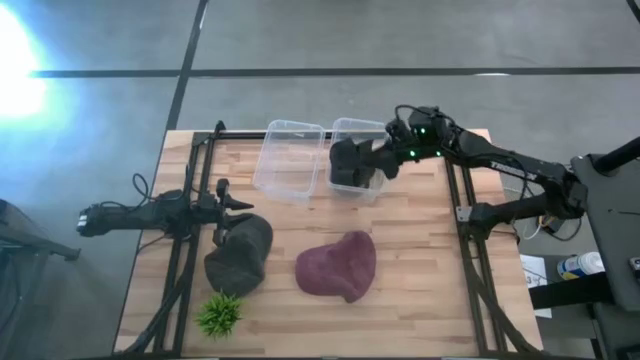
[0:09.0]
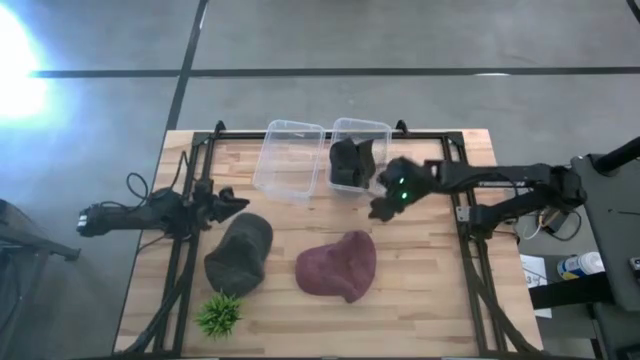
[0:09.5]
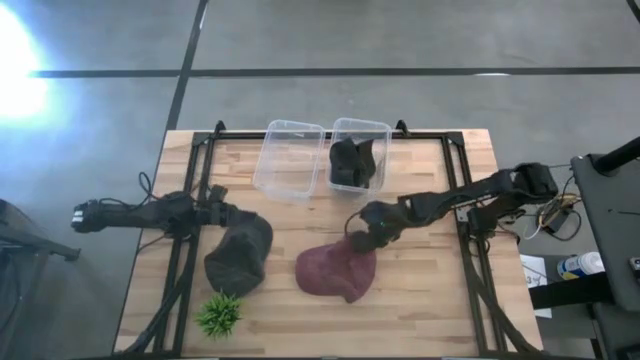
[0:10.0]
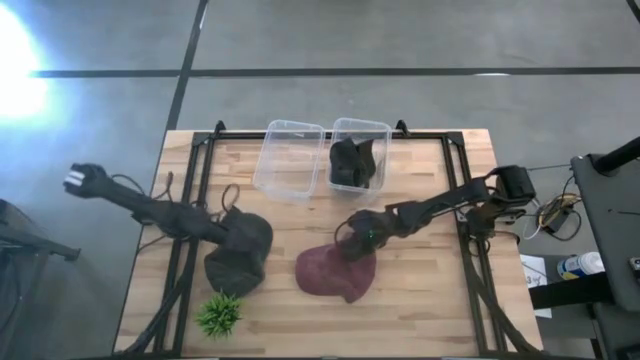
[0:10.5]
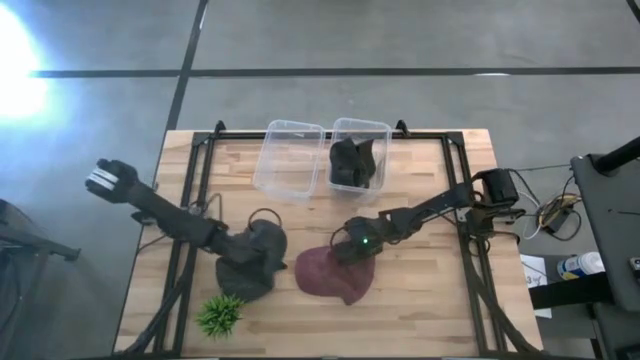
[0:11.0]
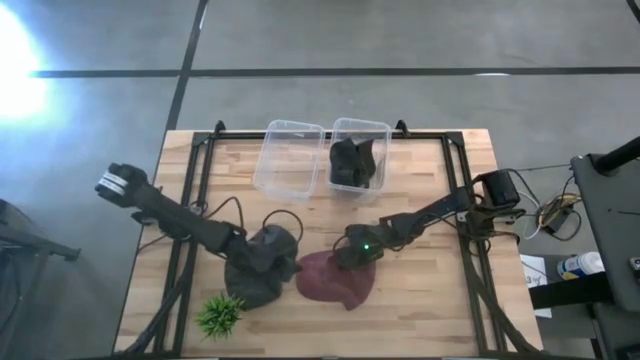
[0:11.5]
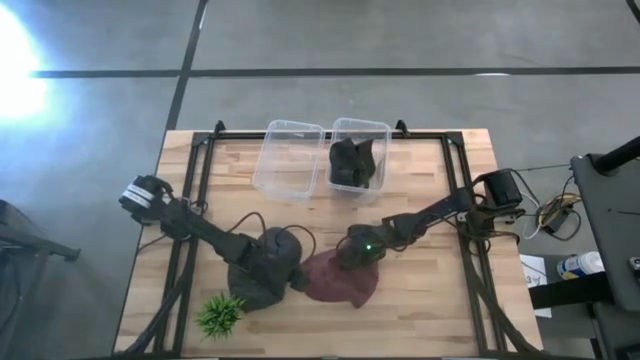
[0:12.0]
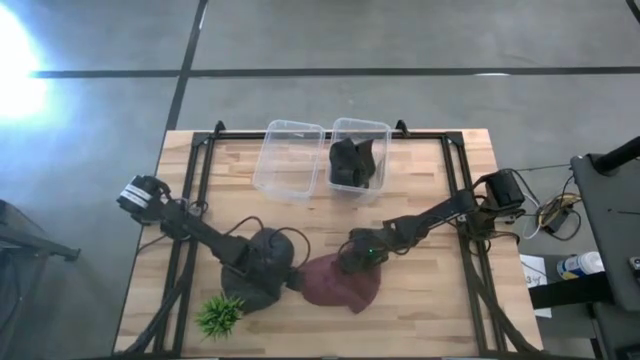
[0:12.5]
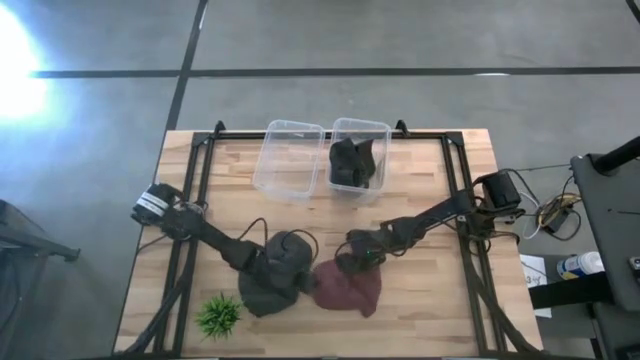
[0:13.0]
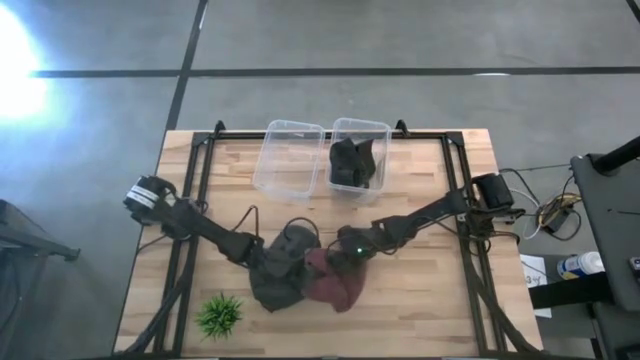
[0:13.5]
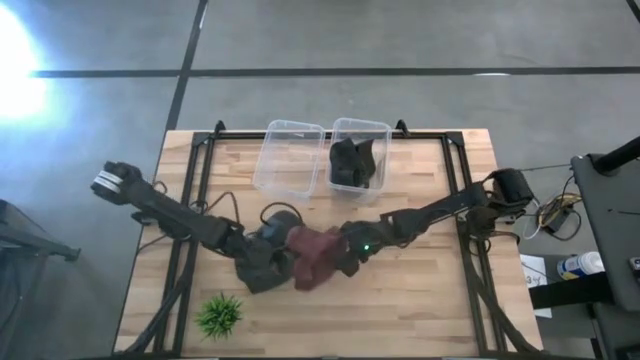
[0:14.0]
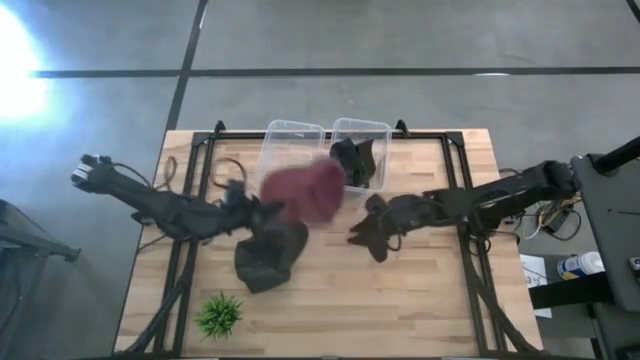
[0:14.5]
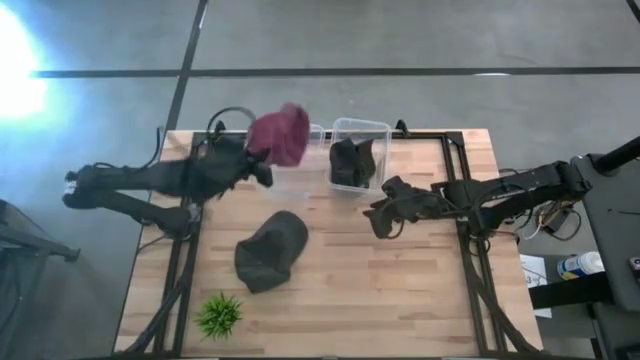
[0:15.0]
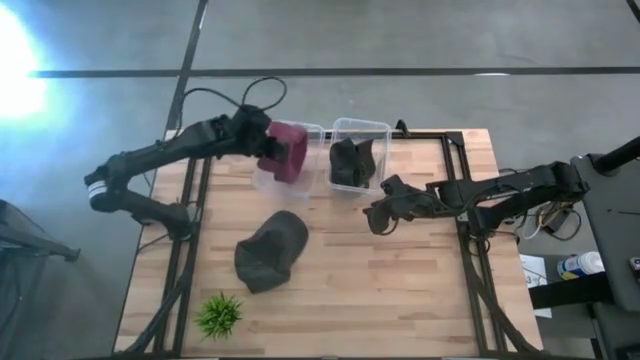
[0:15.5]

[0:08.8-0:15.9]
Task: Pick and place caps into container
Put the red cap into the left transparent container

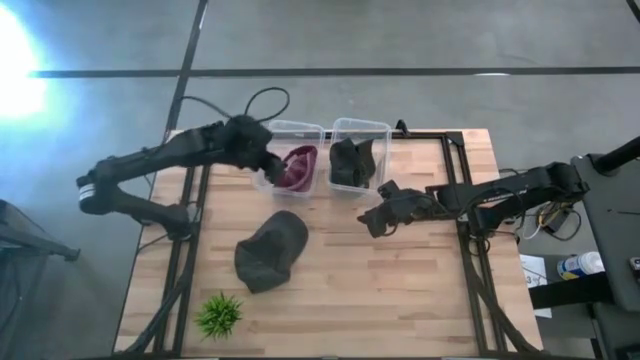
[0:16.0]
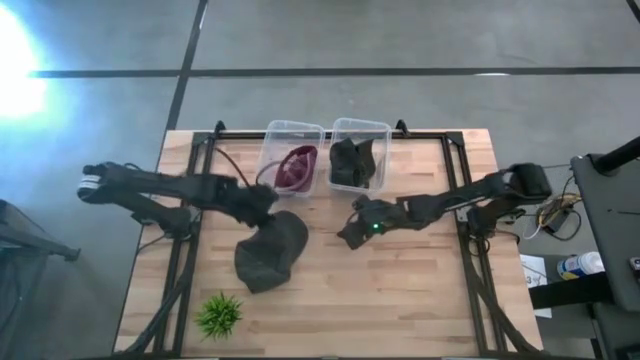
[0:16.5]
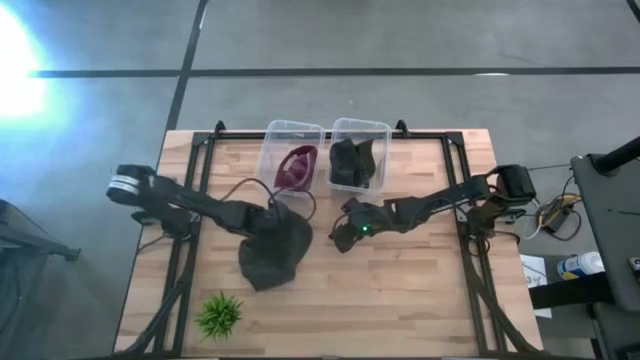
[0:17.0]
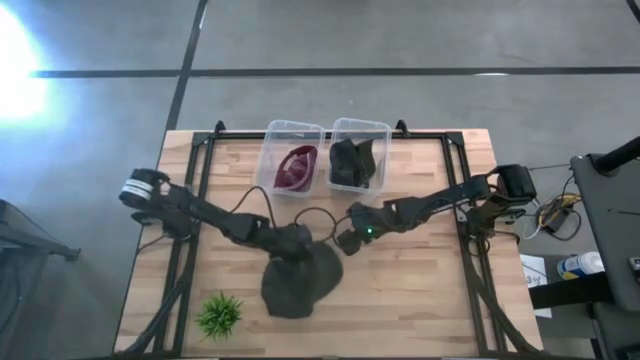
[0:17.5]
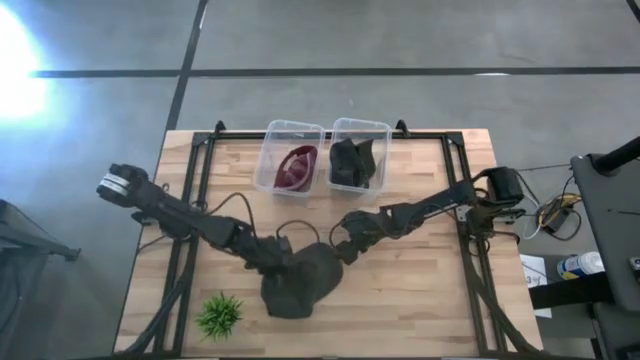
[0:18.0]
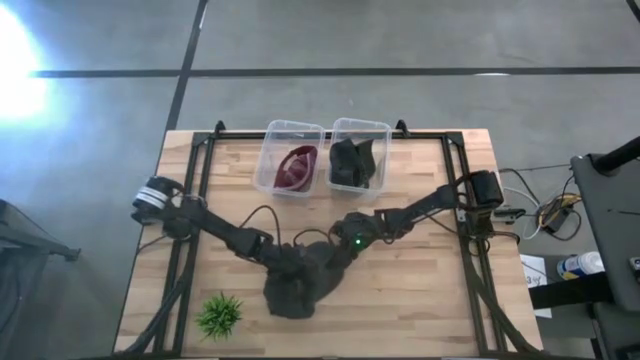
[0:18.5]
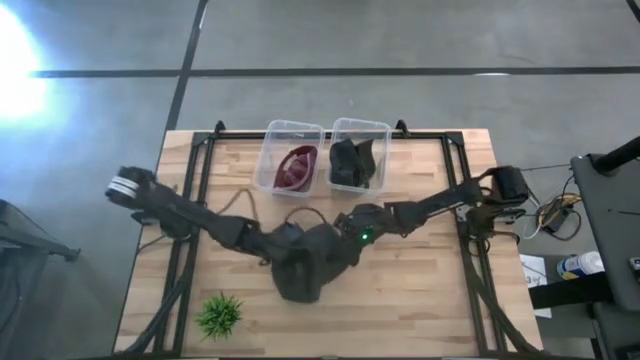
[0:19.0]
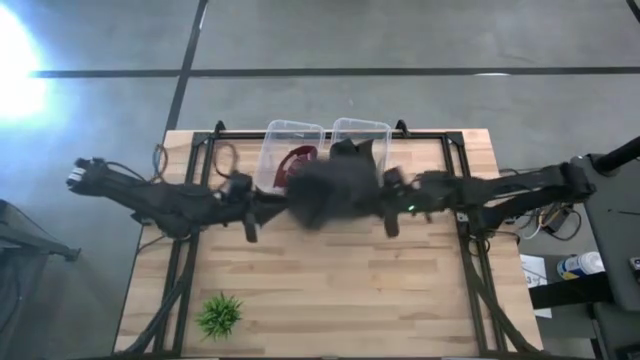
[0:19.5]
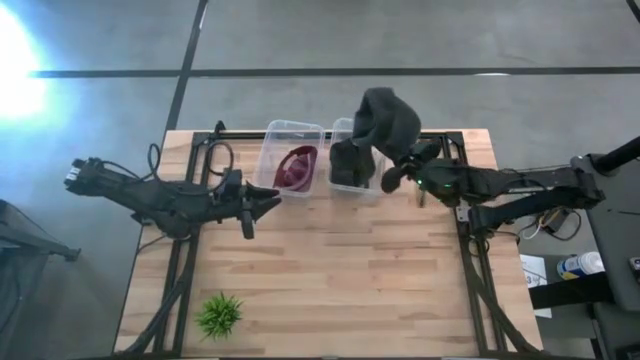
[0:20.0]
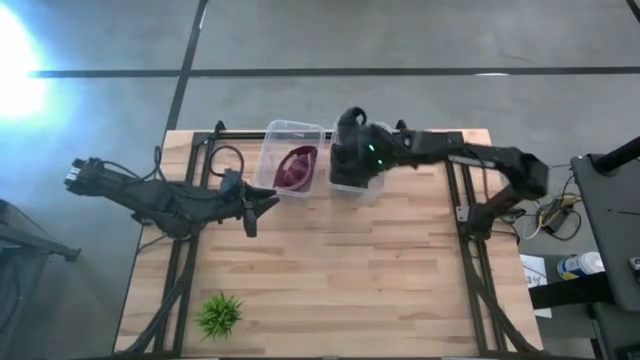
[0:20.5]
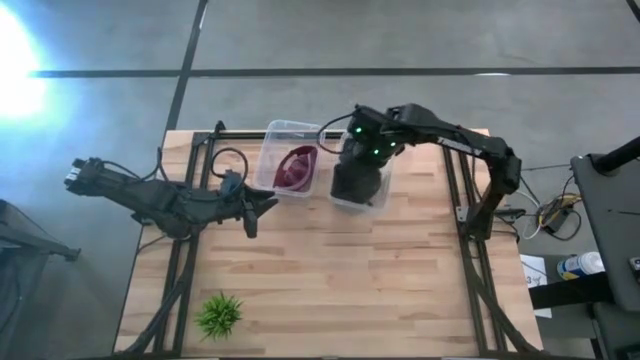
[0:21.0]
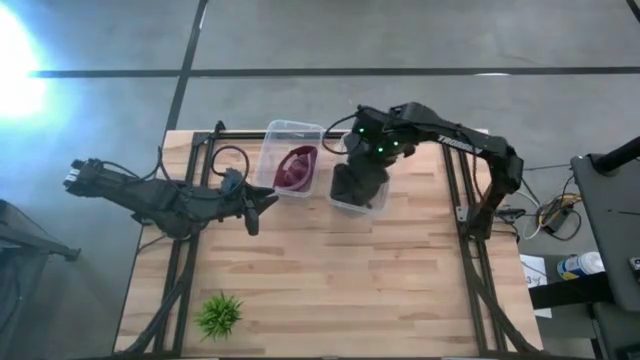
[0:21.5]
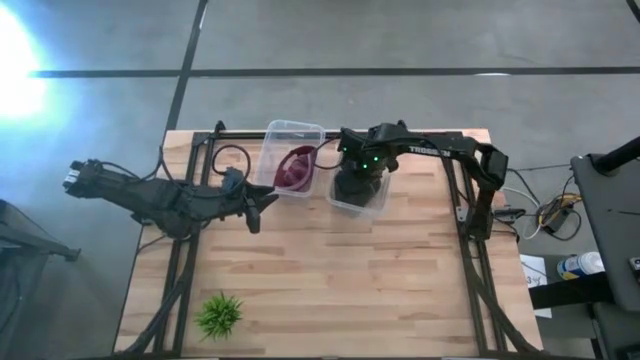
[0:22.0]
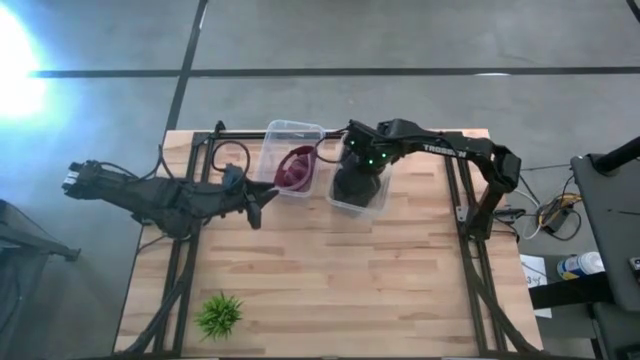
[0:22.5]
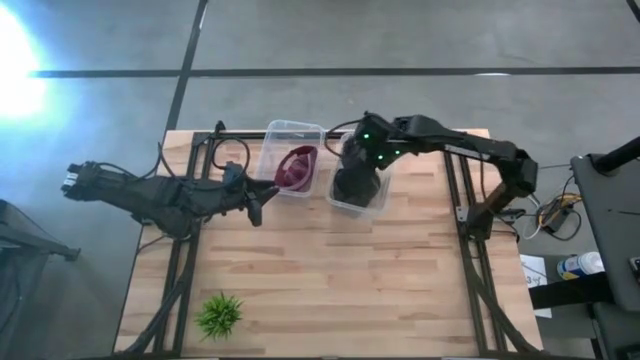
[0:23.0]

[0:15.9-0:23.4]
Put the black cap into the right transparent container

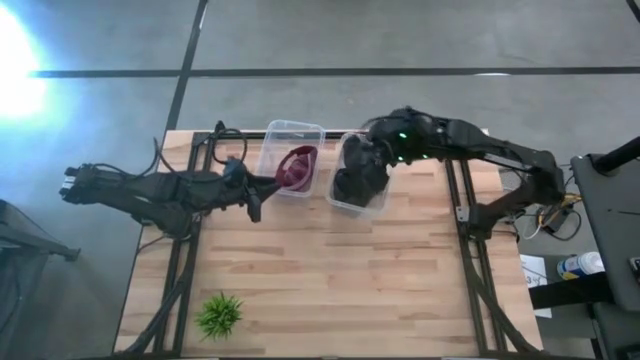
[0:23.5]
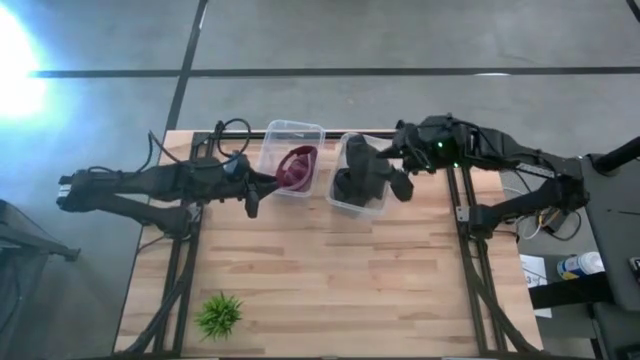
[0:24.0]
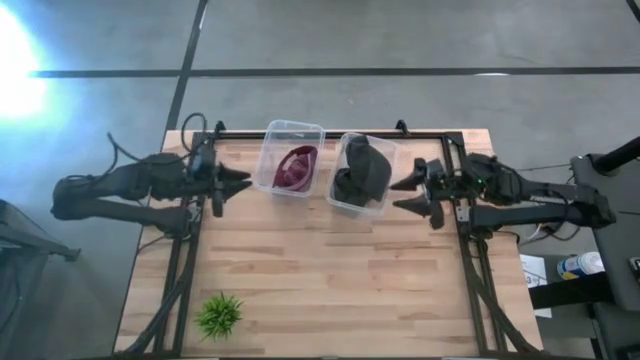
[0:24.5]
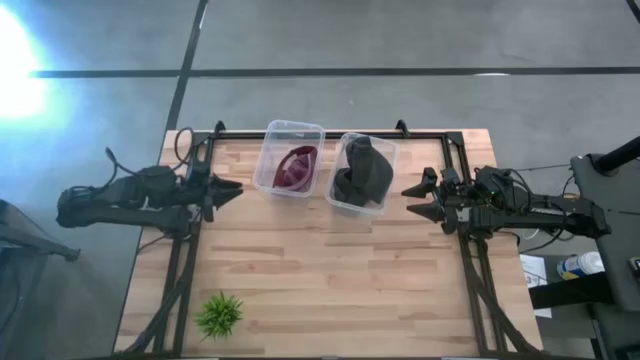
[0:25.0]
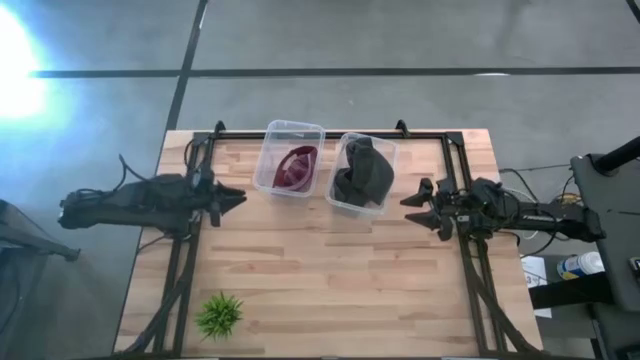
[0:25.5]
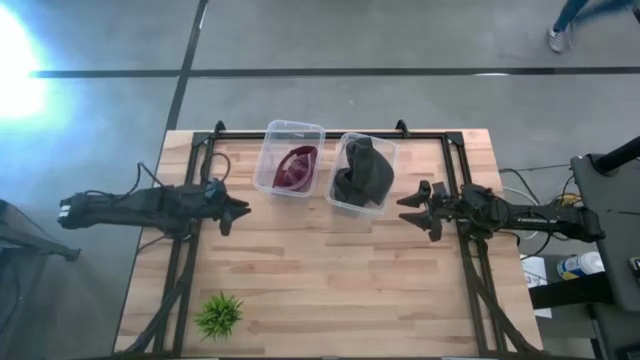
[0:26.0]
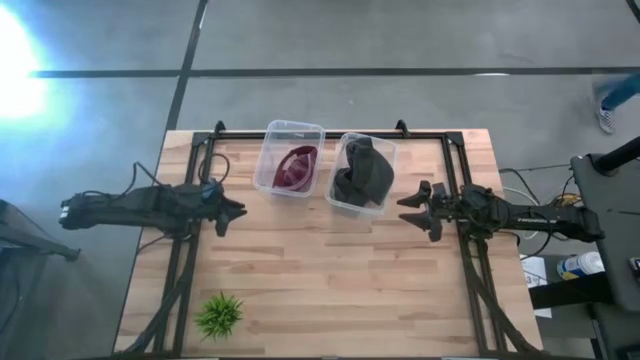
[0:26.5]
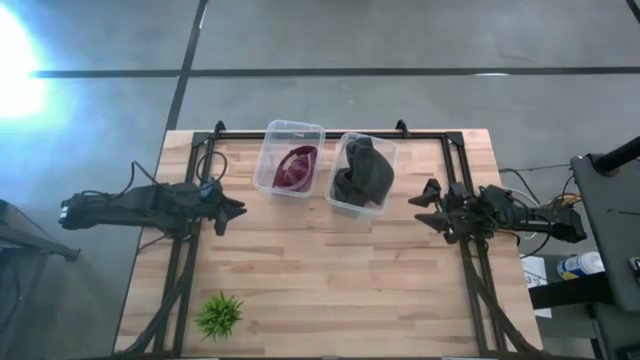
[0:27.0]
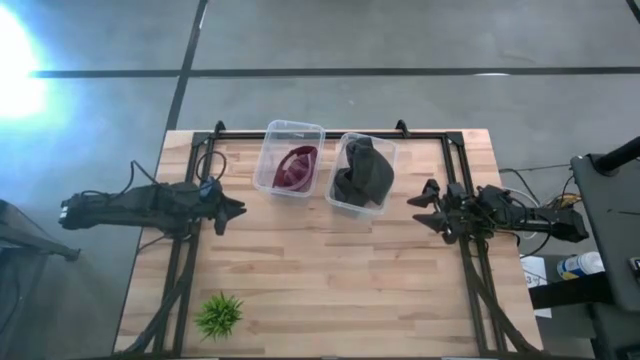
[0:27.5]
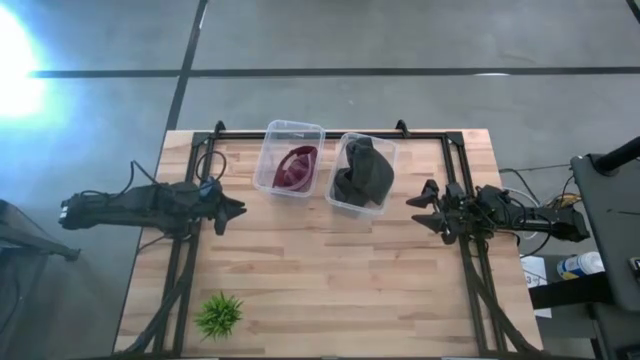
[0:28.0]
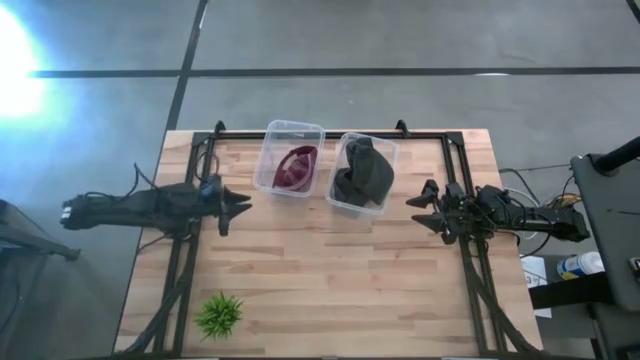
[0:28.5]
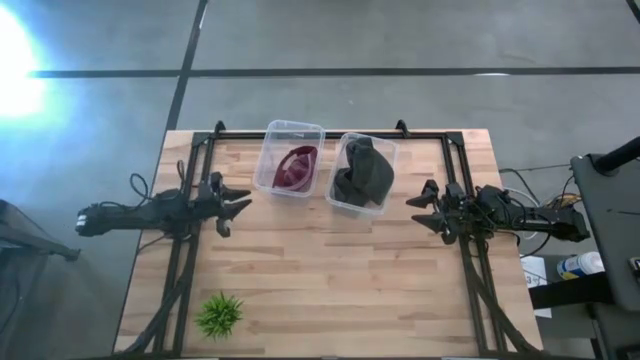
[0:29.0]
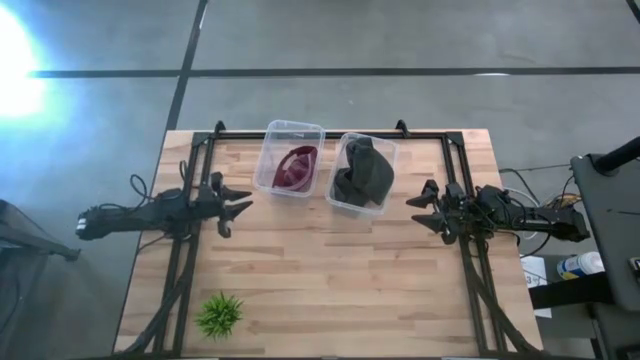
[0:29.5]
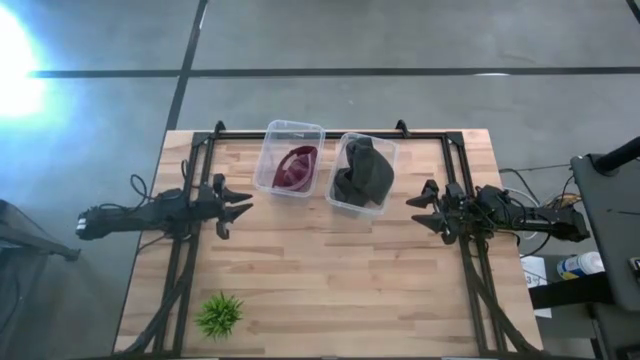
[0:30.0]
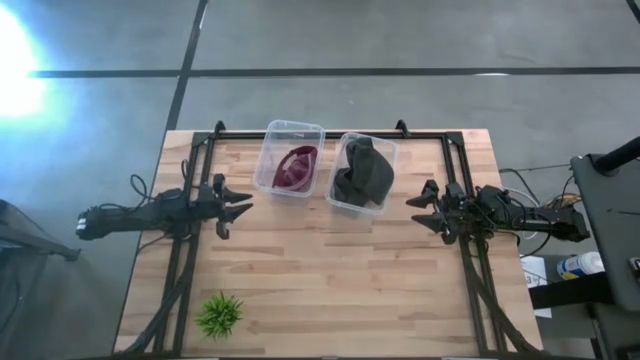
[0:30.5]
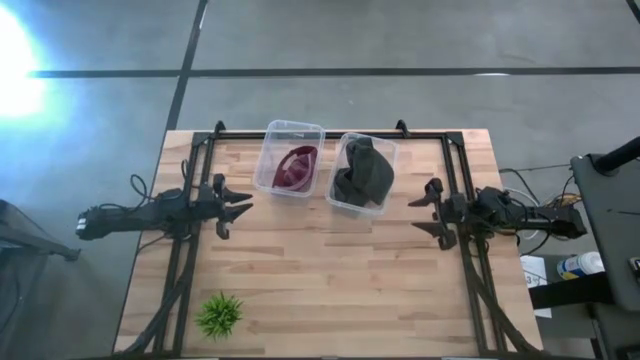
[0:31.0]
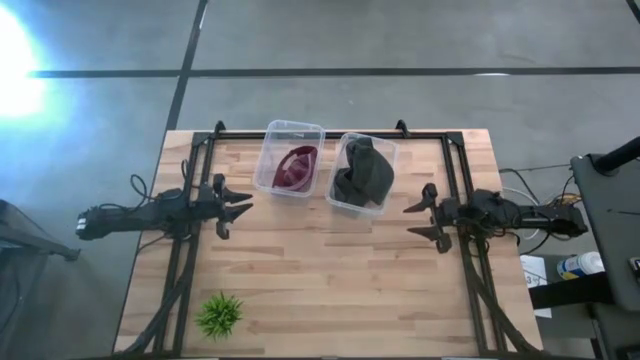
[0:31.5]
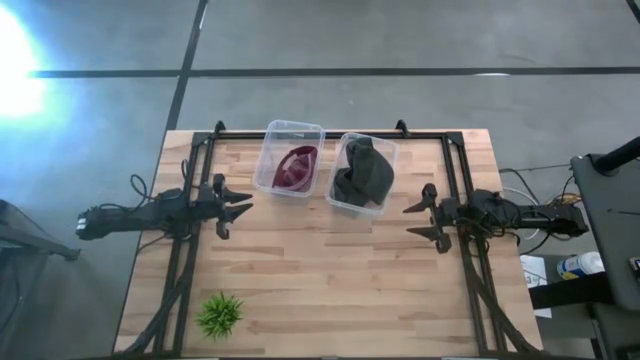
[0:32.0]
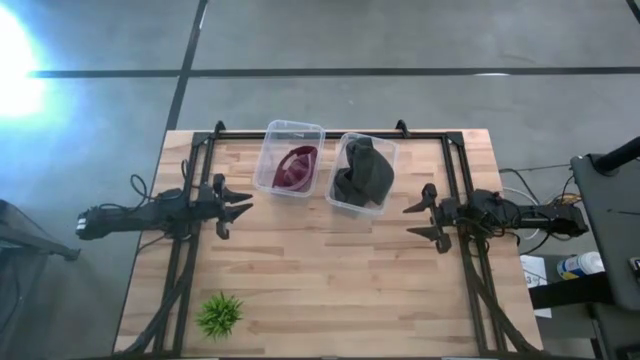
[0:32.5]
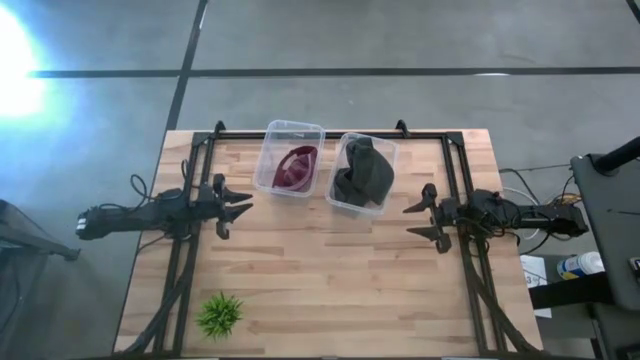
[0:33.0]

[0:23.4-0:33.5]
Return to Home Position
